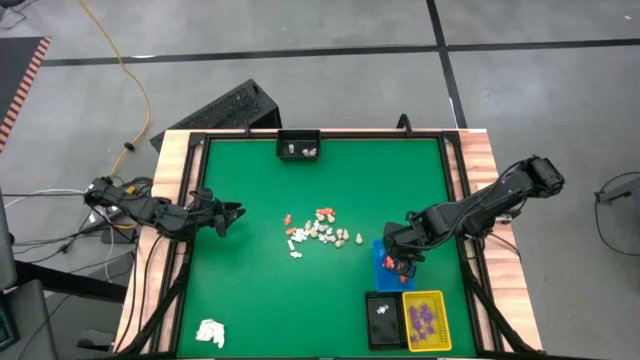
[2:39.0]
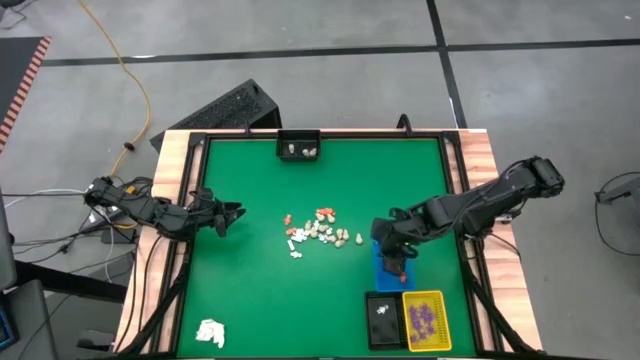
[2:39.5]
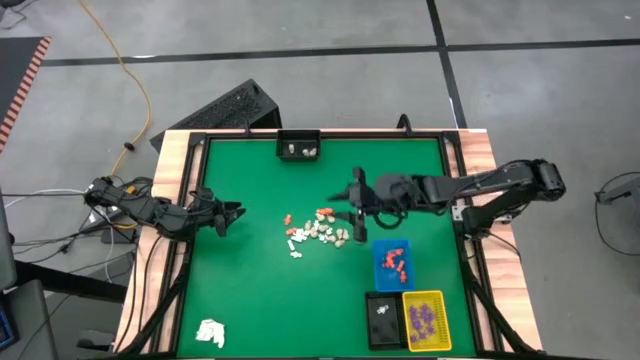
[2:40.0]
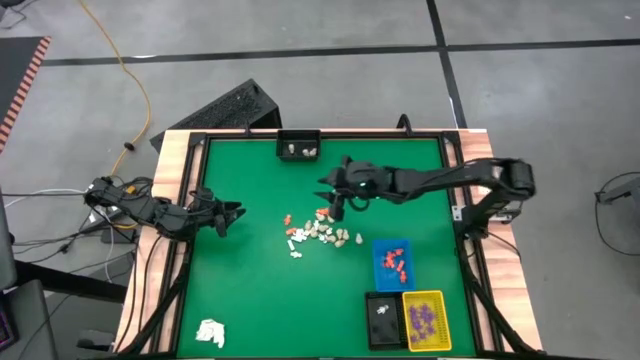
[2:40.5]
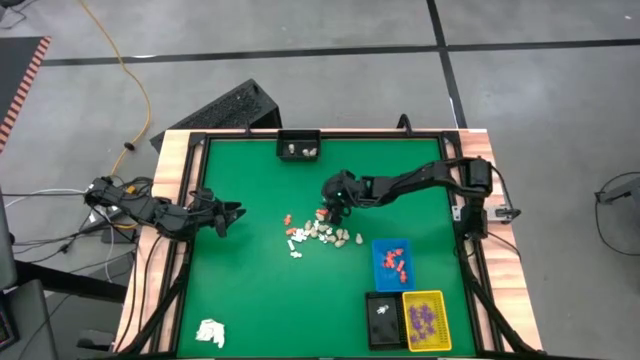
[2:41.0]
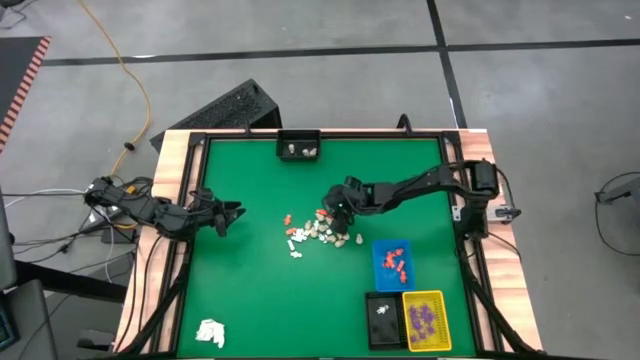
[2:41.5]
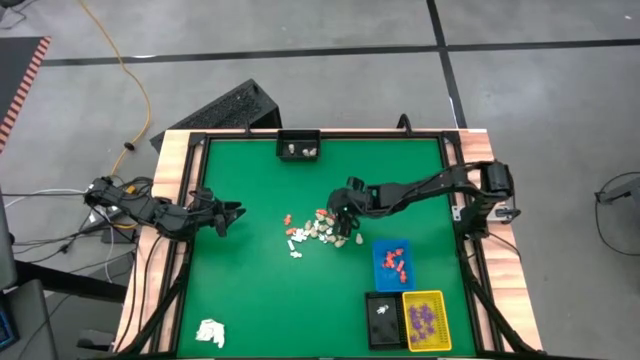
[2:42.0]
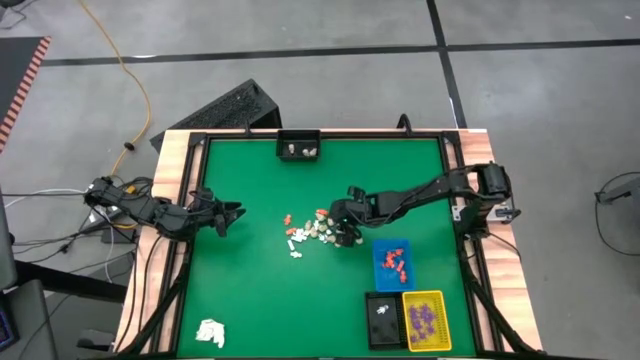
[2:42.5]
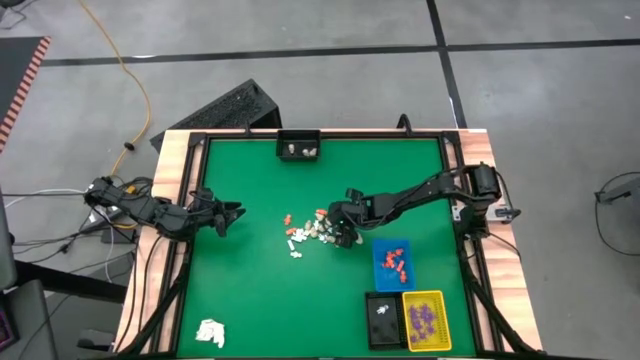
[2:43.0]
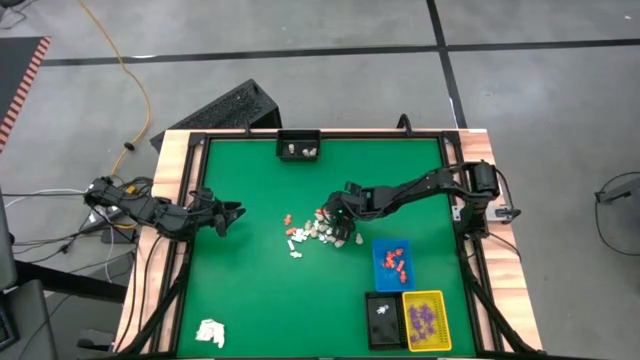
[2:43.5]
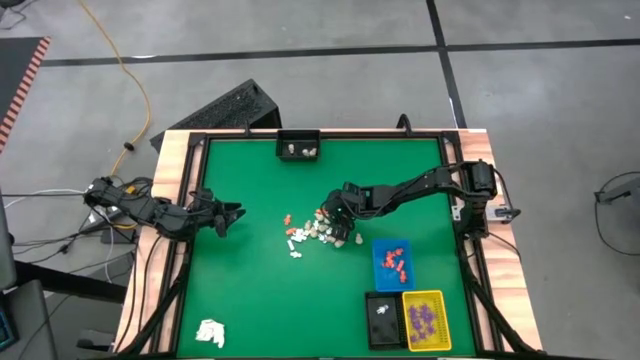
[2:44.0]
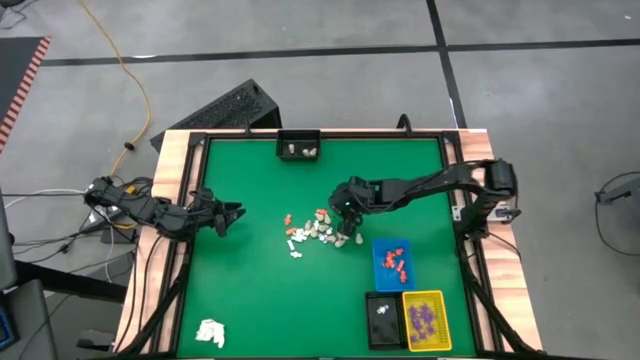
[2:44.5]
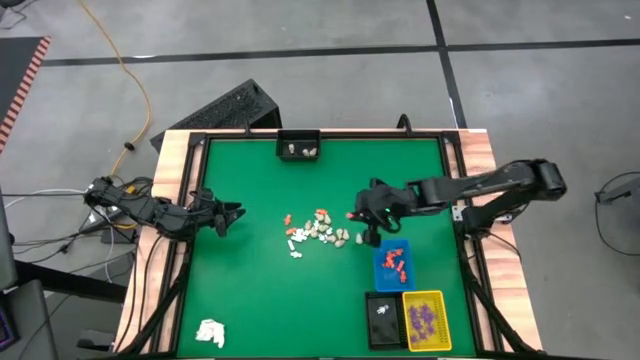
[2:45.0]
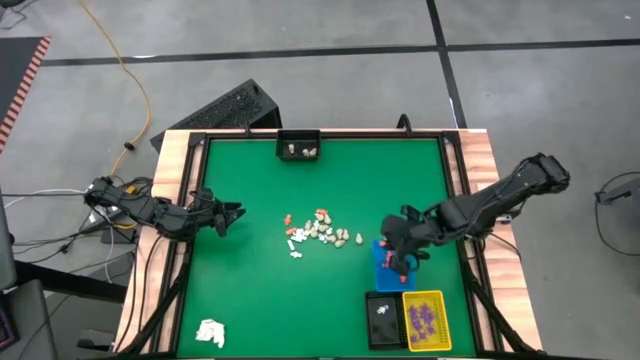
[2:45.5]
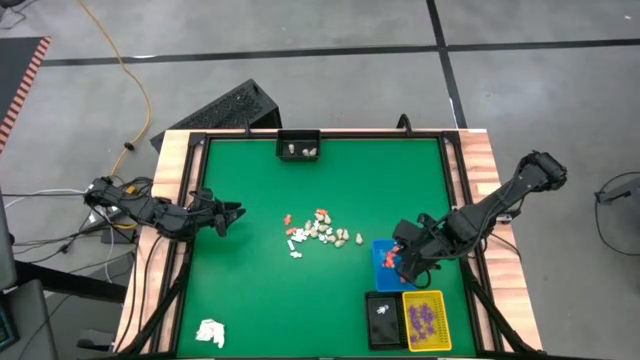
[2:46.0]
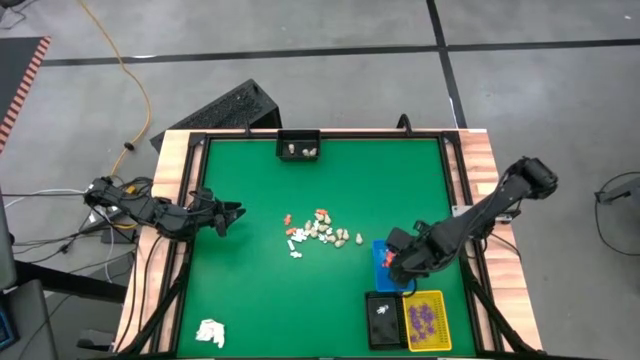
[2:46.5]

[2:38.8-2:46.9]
Task: Sort Halloween decoration
Put the orange skeleton toy into the blue bin

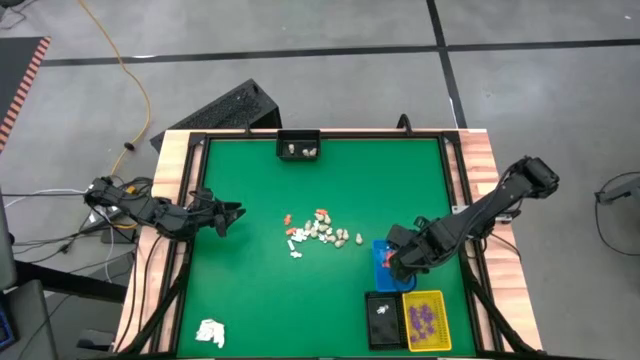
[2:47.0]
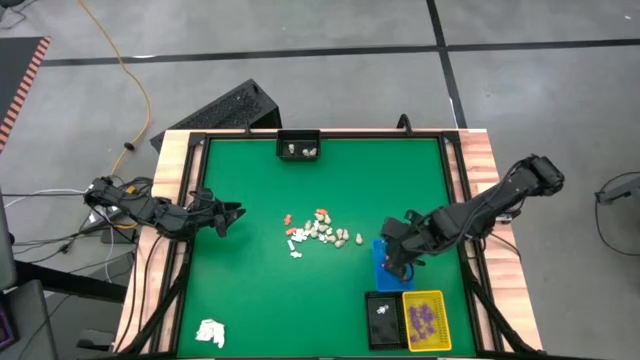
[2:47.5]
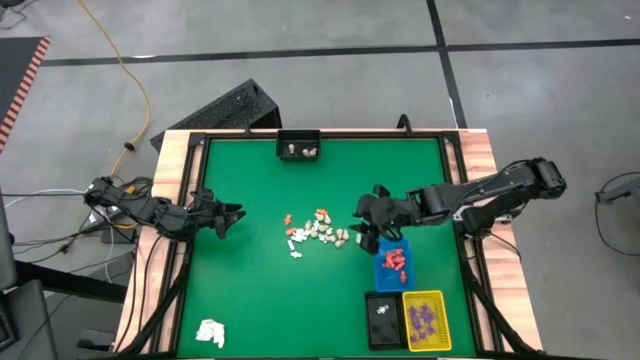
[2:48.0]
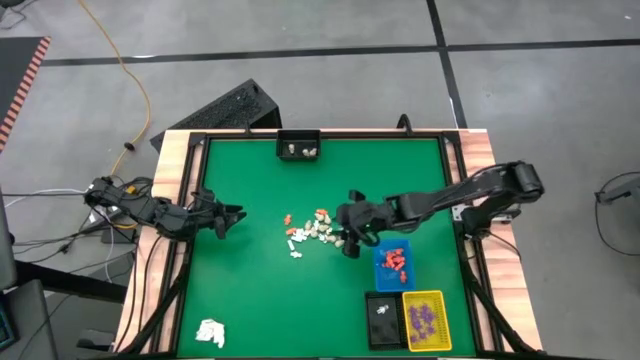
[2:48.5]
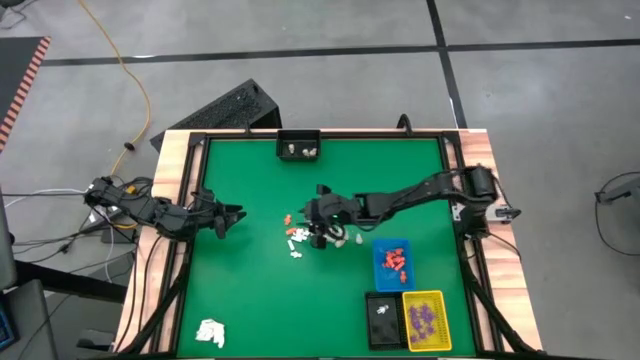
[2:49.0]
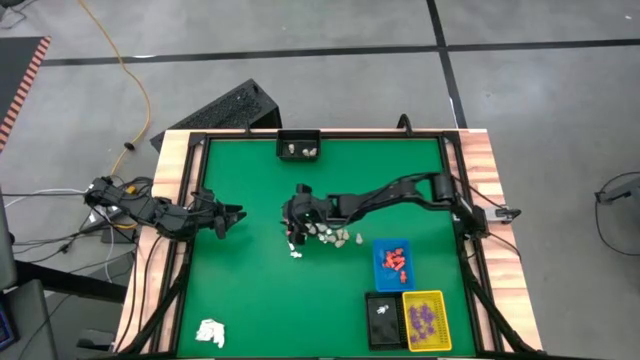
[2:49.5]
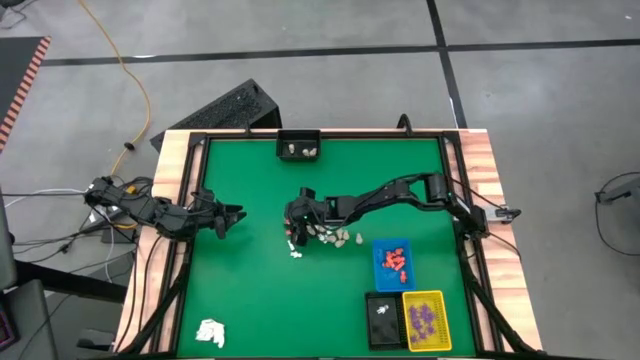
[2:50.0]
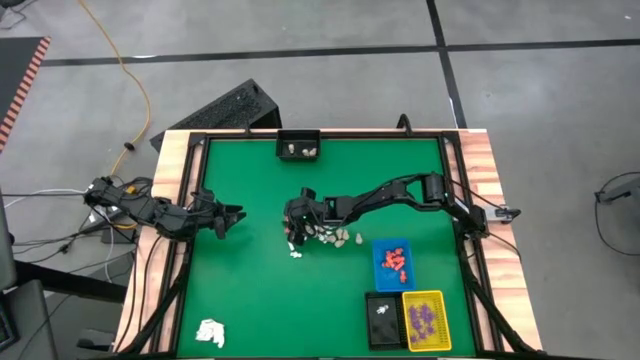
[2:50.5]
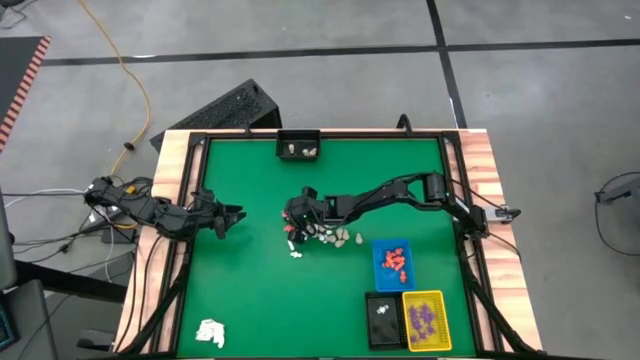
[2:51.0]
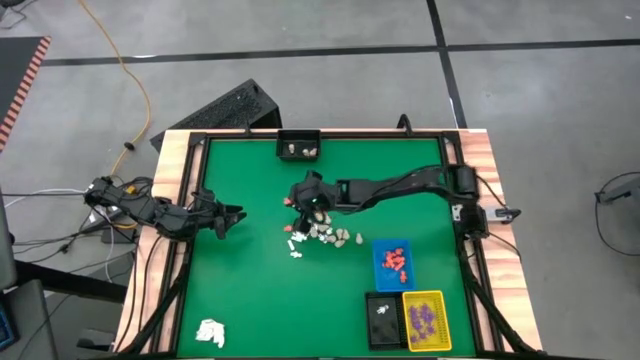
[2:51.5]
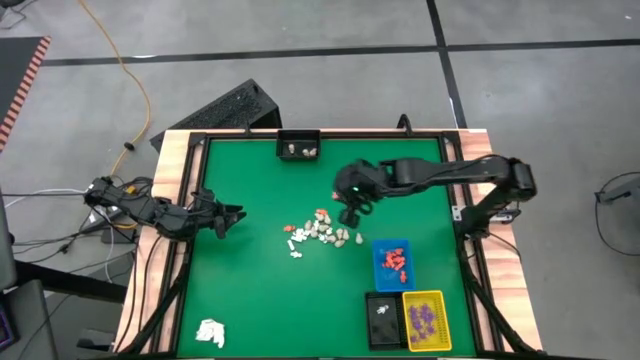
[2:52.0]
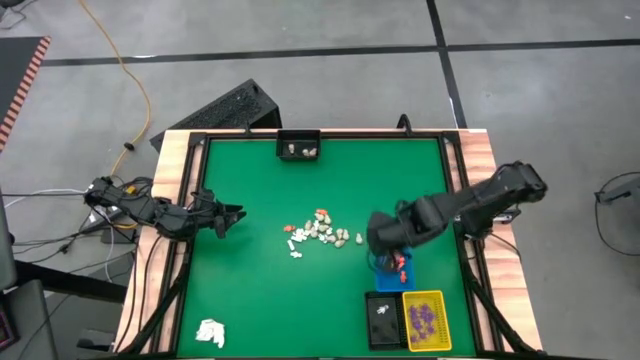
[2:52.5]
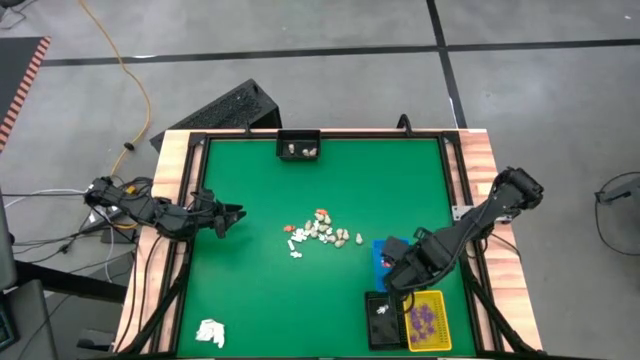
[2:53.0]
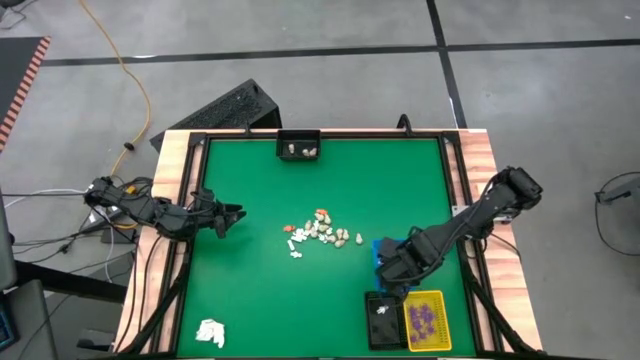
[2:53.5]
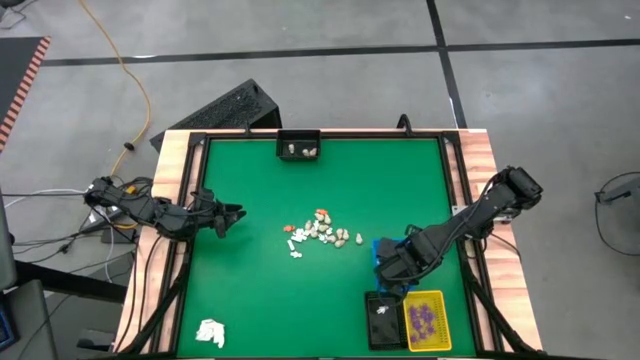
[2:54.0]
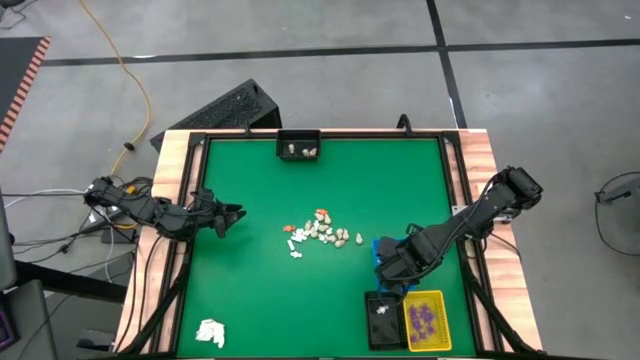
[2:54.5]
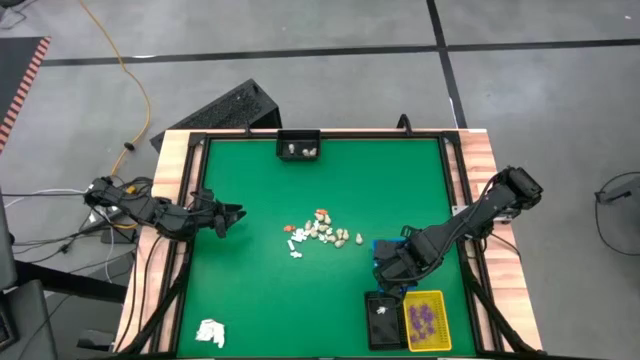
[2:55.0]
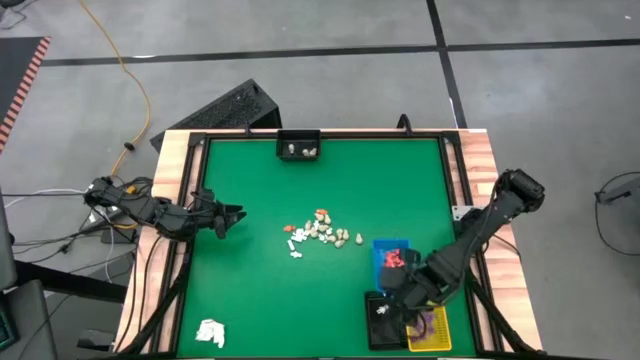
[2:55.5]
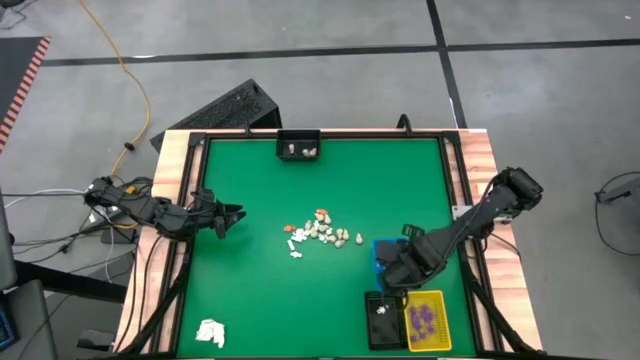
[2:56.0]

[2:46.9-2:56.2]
Put the orange skeleton toy into the blue bin

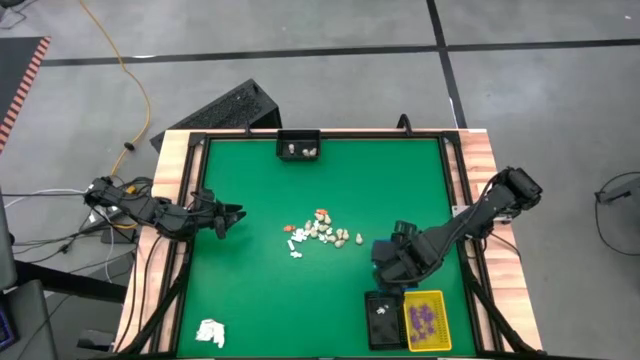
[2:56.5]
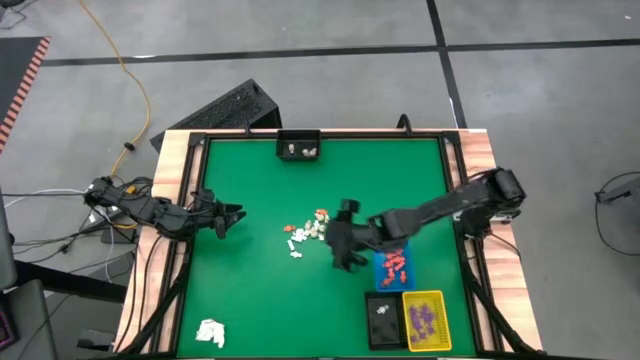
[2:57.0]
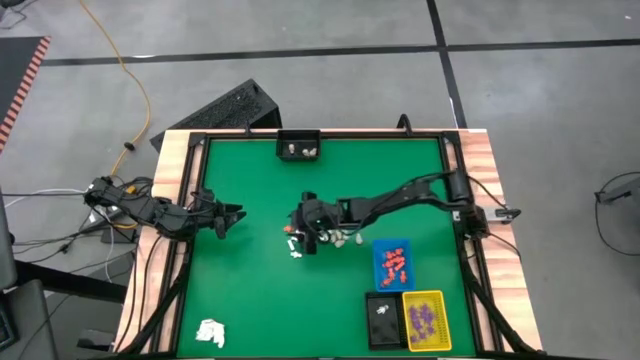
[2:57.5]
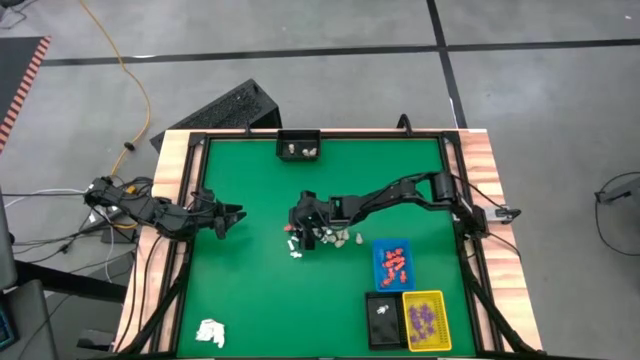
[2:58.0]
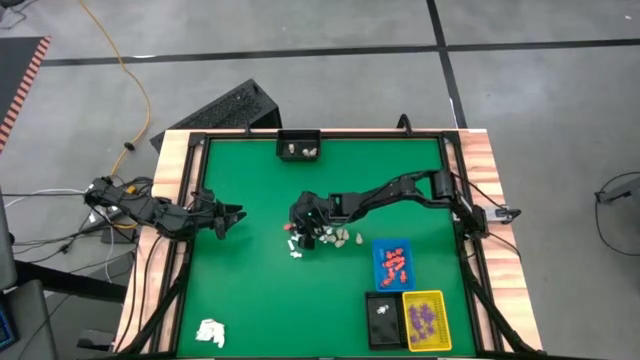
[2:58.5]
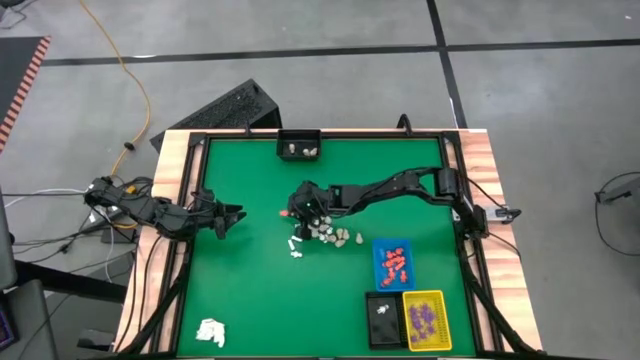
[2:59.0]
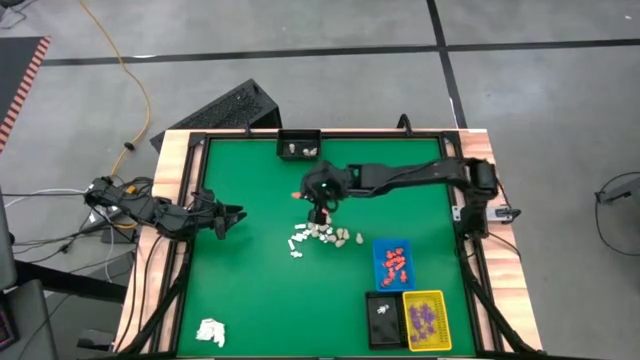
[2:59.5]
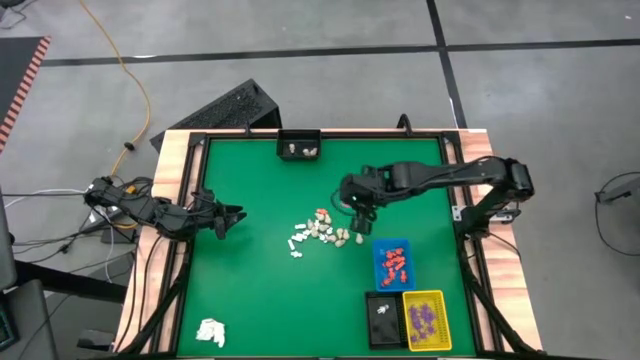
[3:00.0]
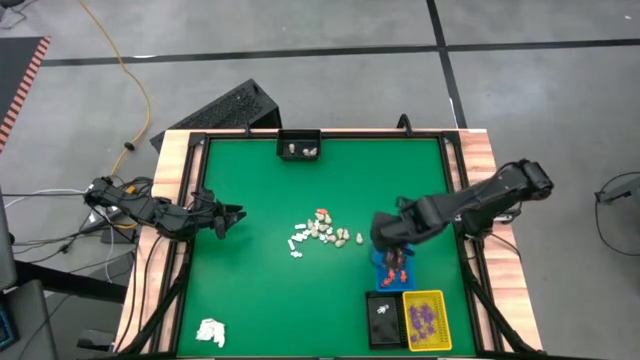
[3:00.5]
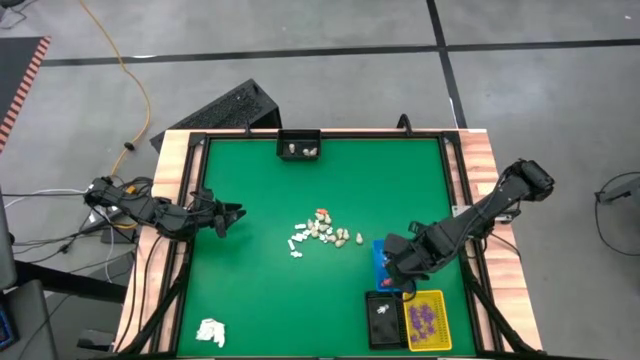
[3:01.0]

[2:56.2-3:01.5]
Put the orange skeleton toy into the blue bin
